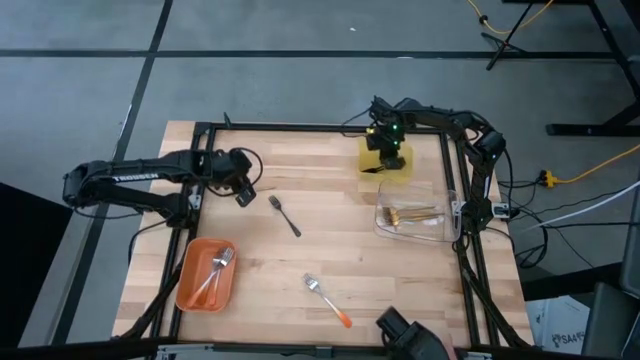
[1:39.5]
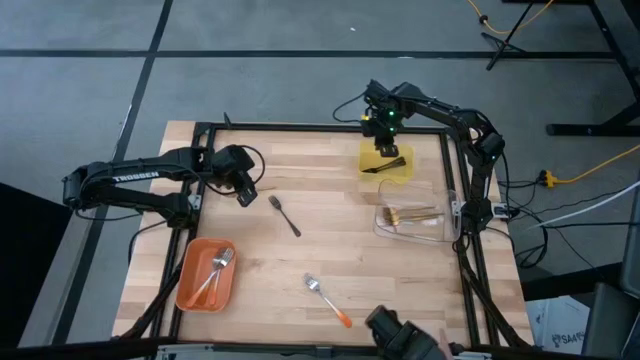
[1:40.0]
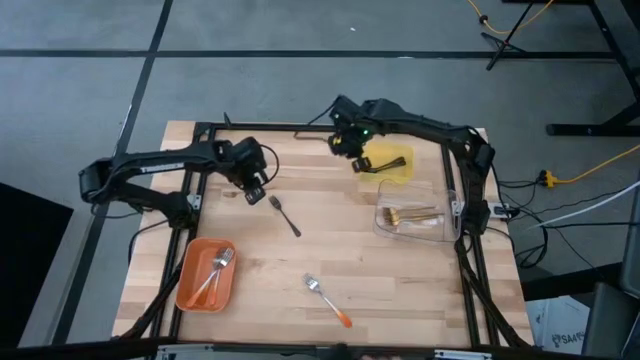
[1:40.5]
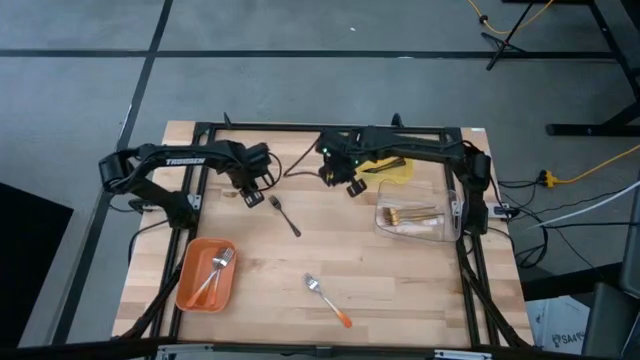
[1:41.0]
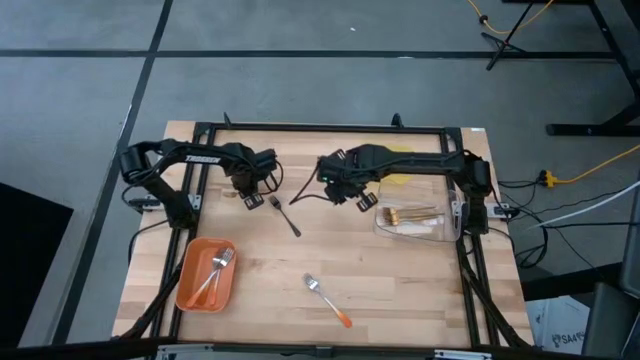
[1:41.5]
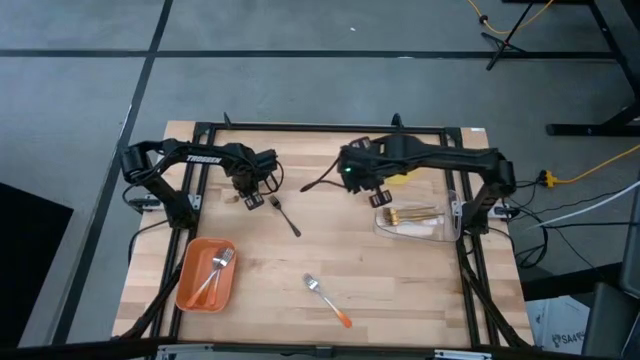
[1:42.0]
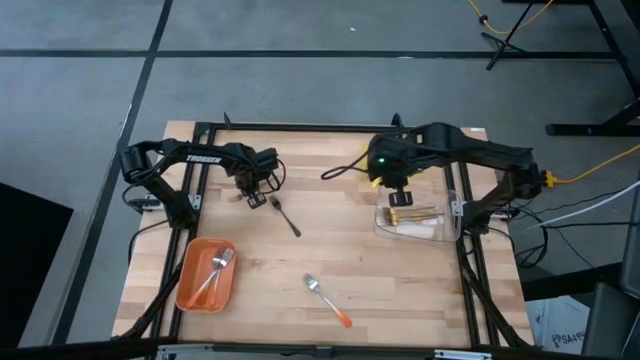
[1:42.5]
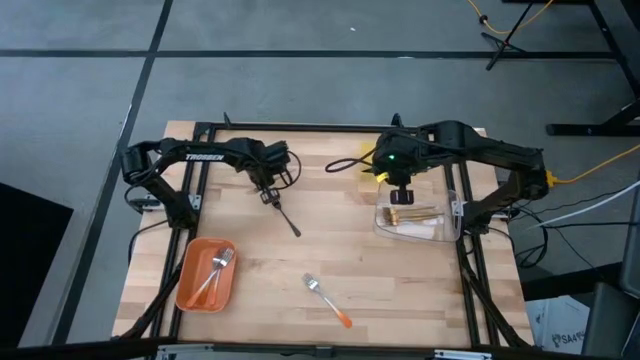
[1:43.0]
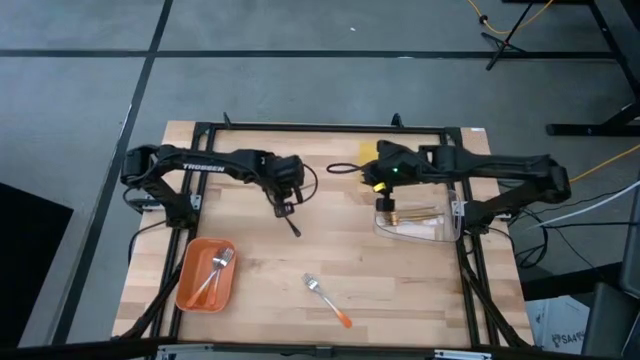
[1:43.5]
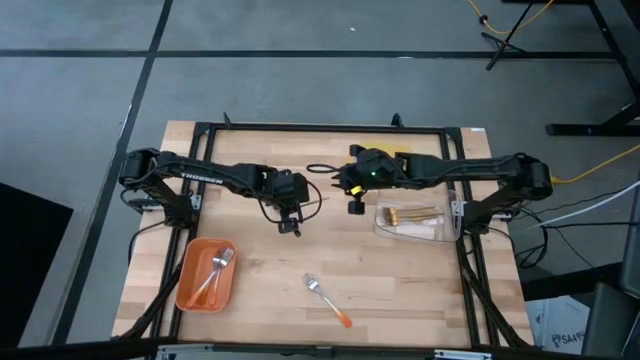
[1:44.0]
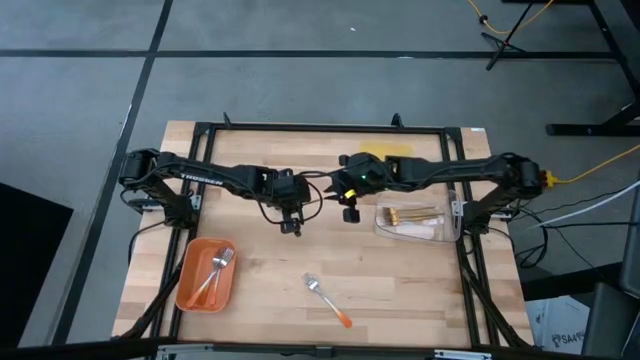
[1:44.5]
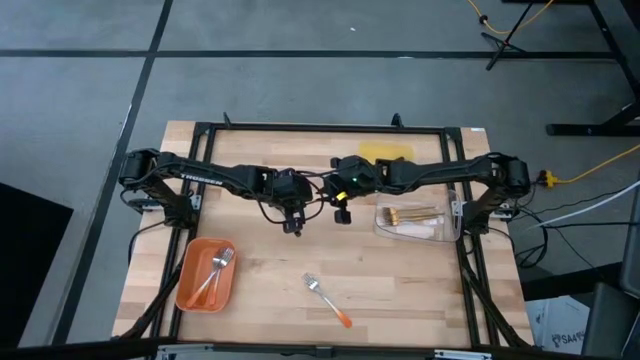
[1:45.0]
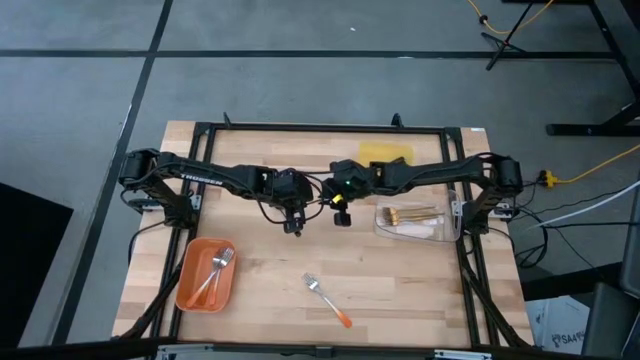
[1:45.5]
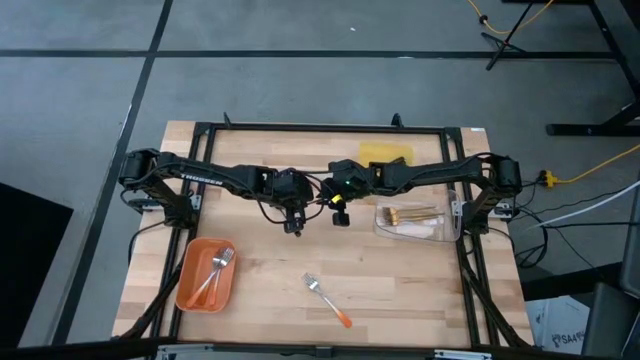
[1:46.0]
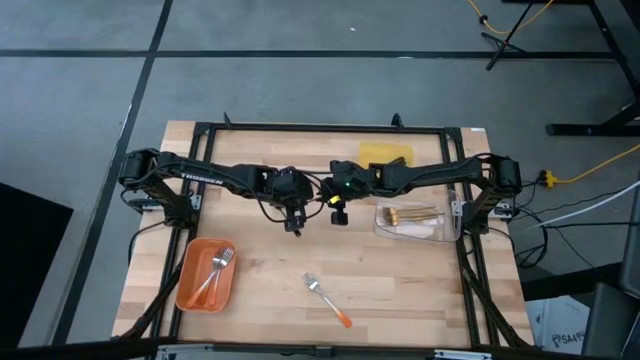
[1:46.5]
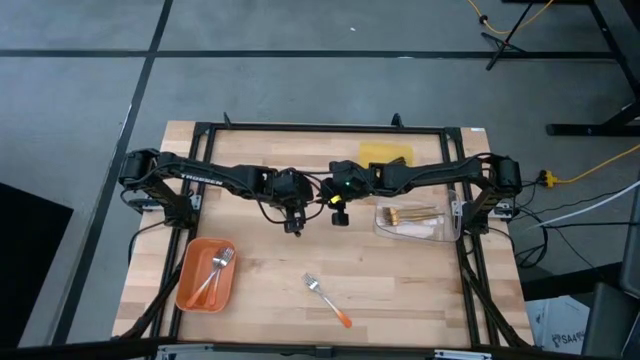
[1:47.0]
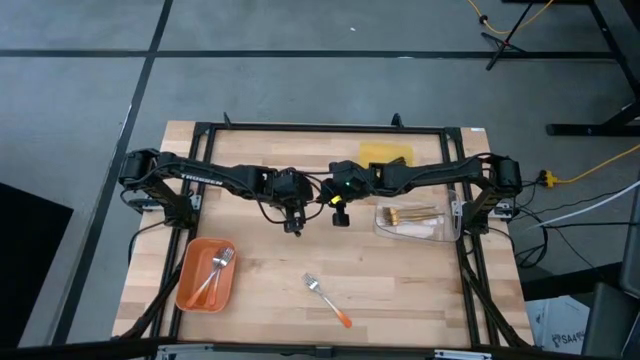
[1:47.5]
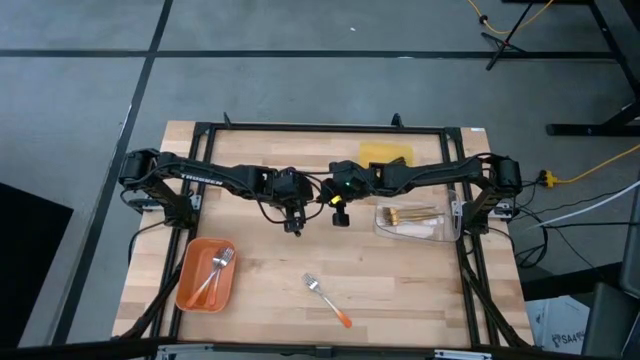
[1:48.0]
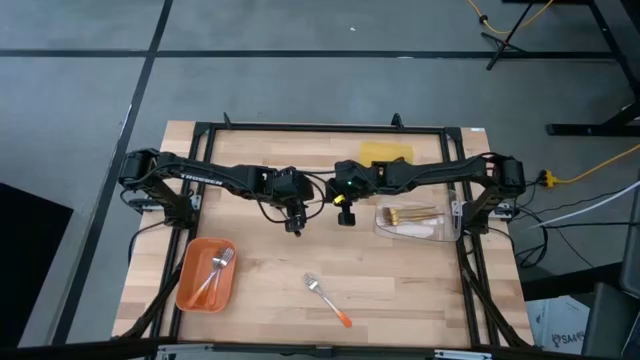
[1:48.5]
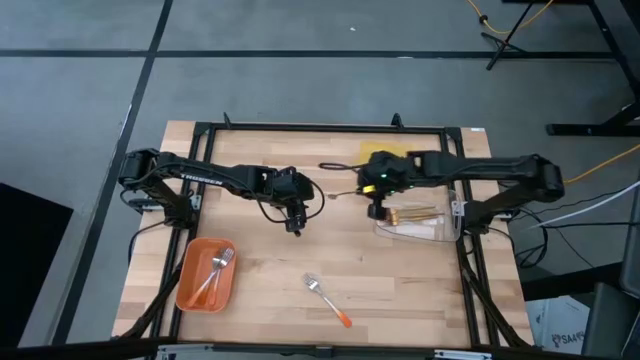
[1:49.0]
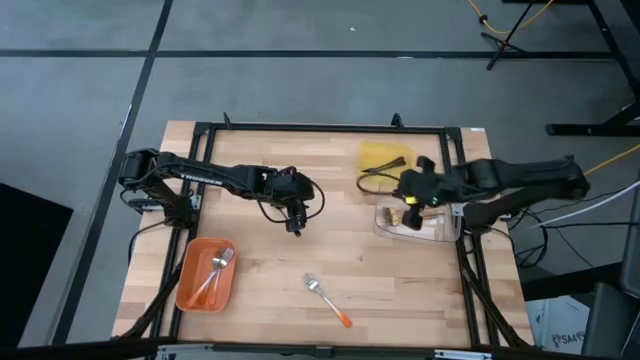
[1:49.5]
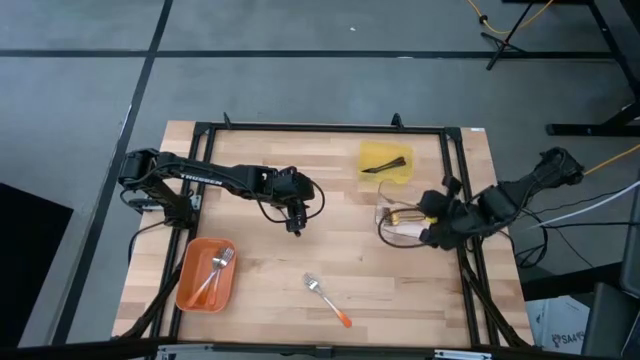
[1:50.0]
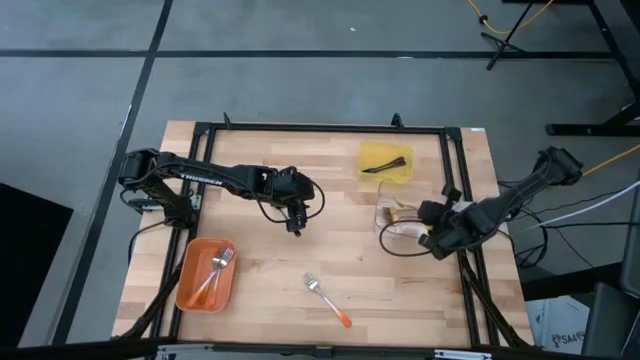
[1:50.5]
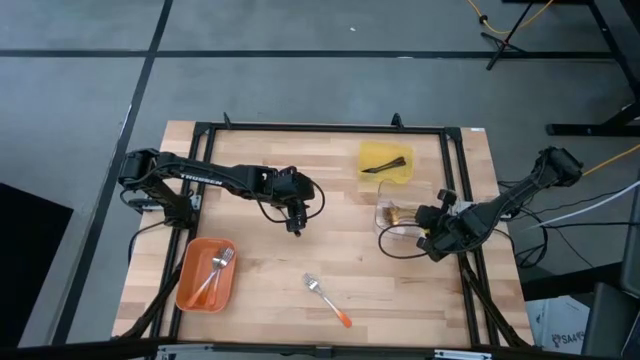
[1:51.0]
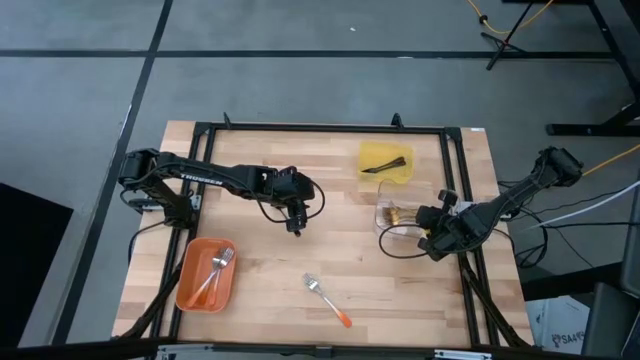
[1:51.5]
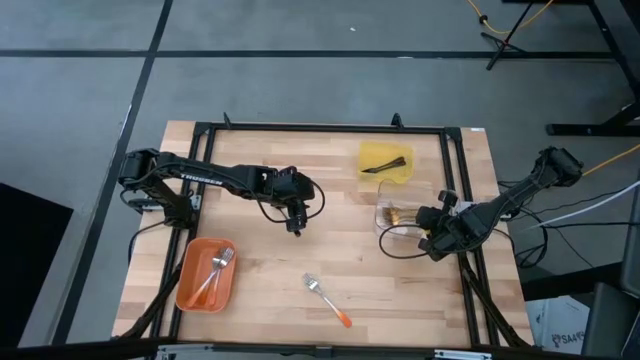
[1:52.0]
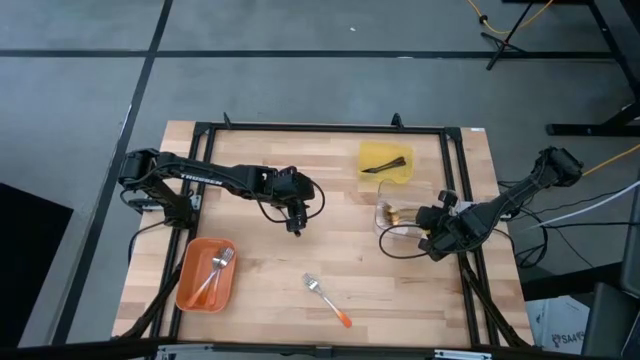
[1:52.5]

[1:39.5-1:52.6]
Task: Sort silverware by color (type)
Put the gold fork into the transparent bin

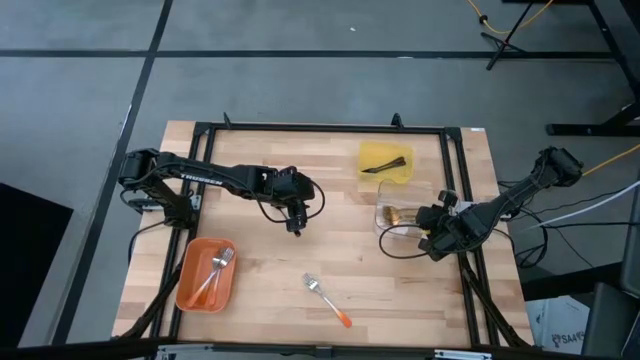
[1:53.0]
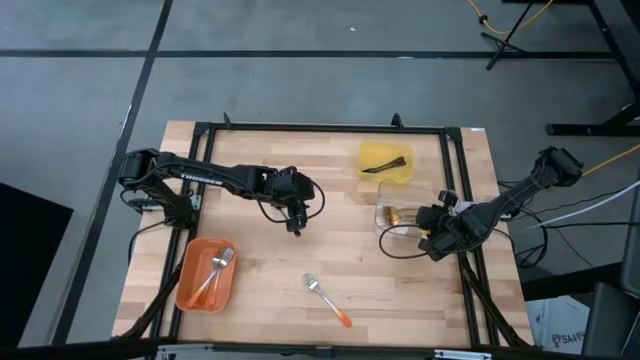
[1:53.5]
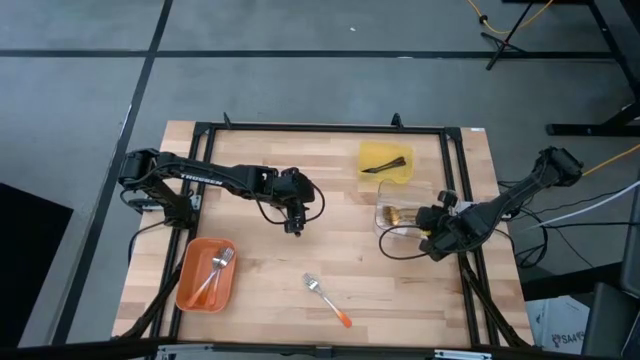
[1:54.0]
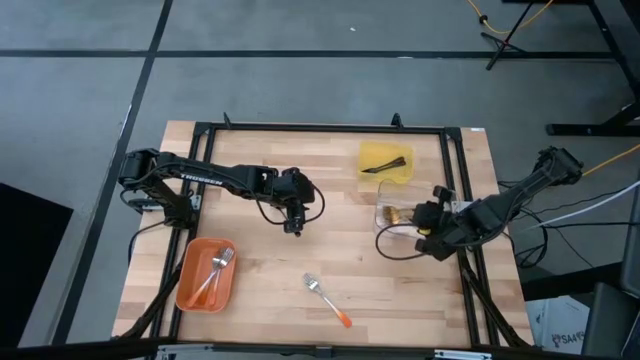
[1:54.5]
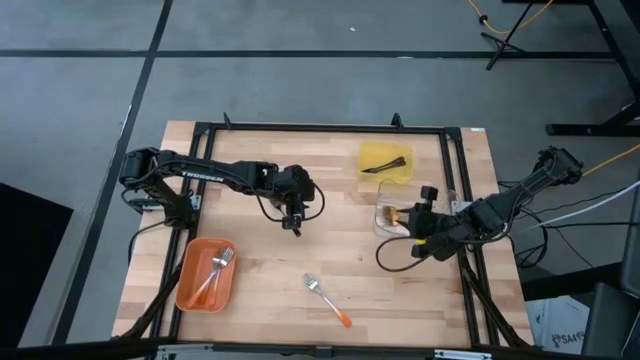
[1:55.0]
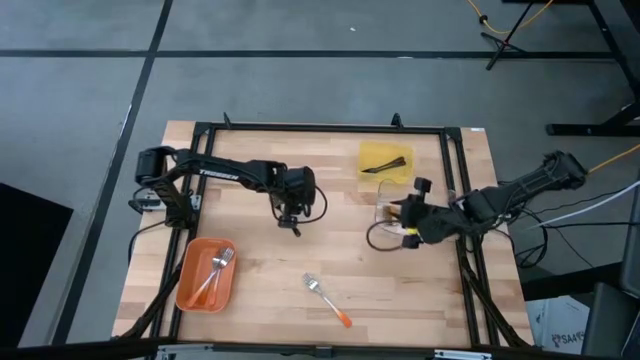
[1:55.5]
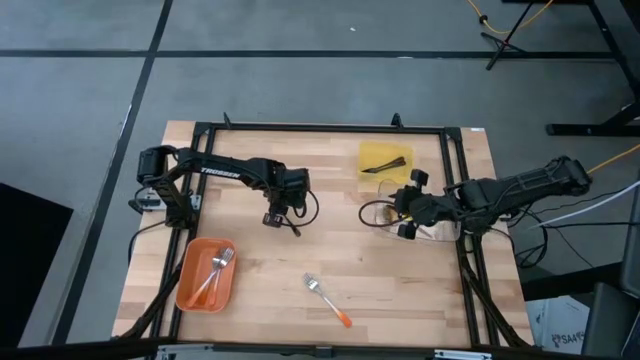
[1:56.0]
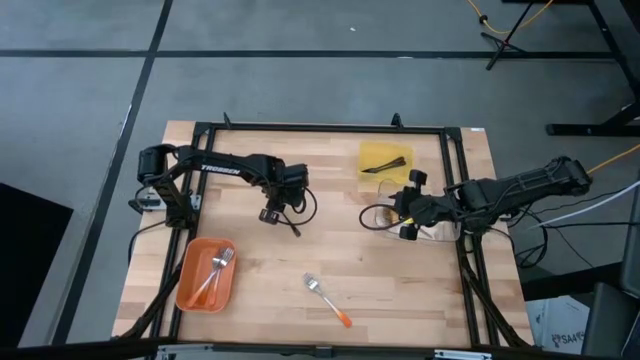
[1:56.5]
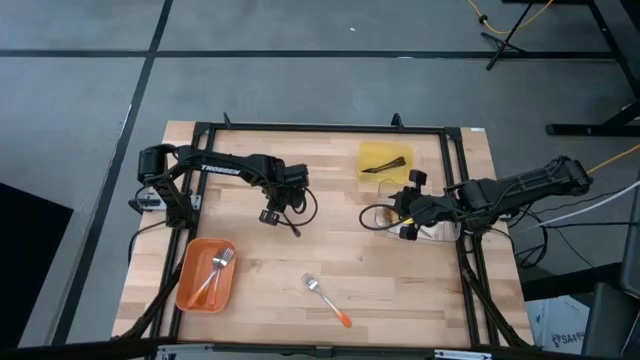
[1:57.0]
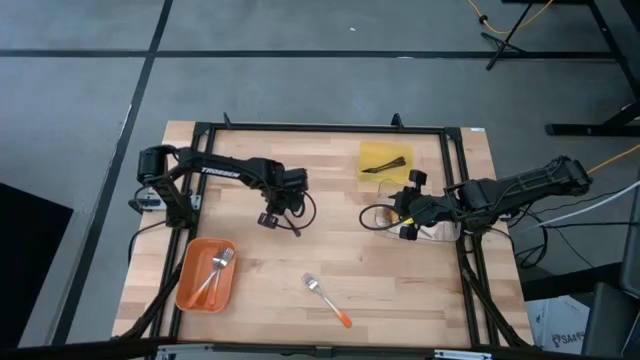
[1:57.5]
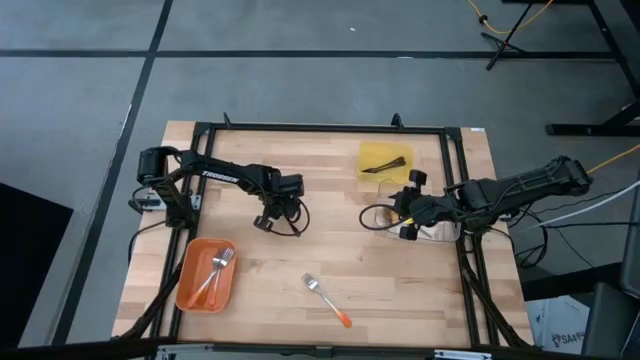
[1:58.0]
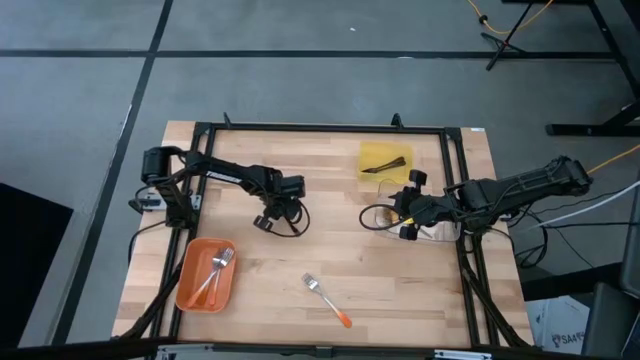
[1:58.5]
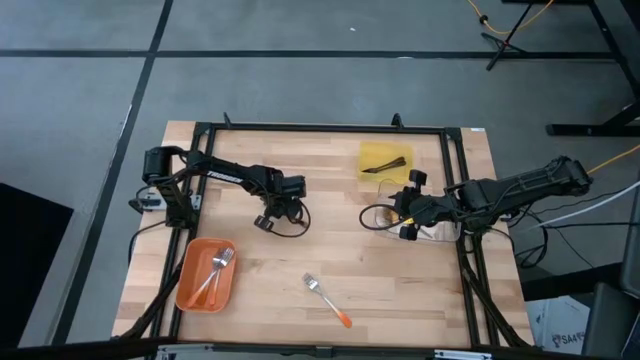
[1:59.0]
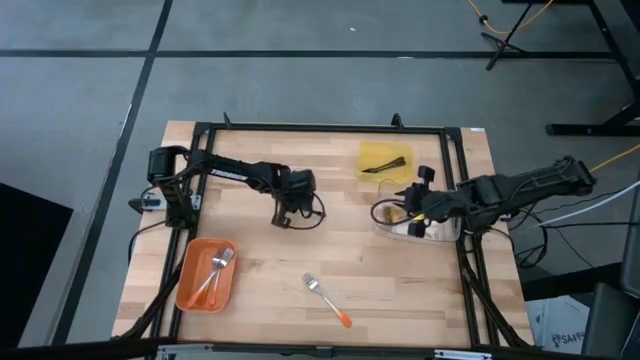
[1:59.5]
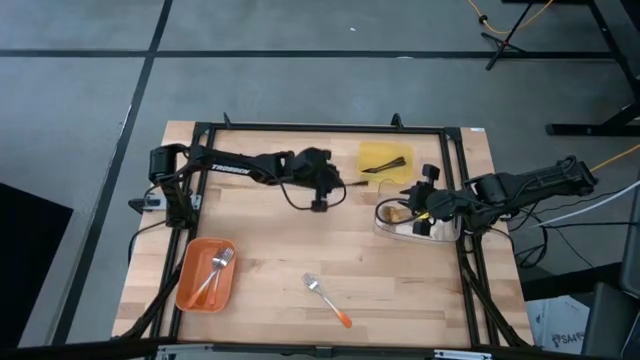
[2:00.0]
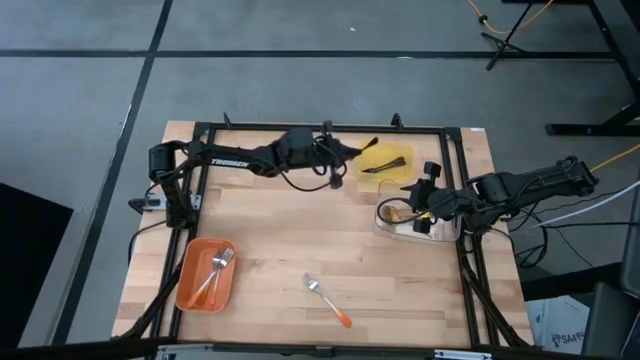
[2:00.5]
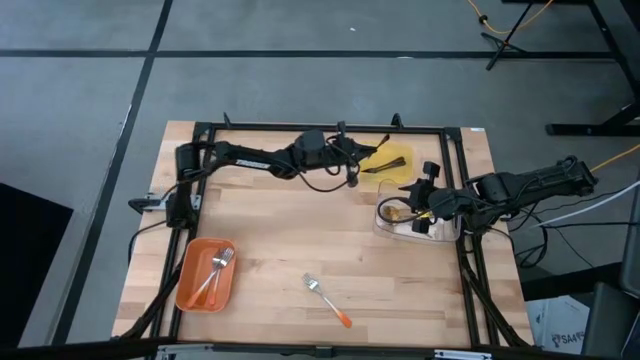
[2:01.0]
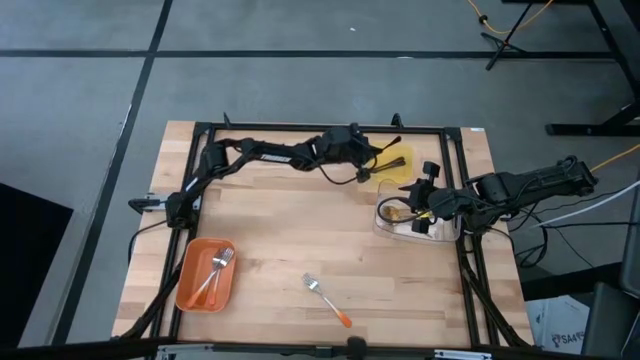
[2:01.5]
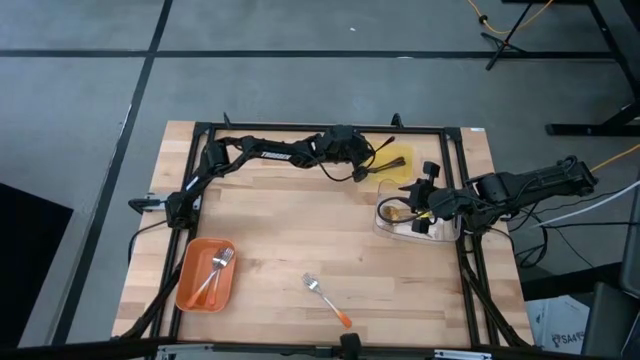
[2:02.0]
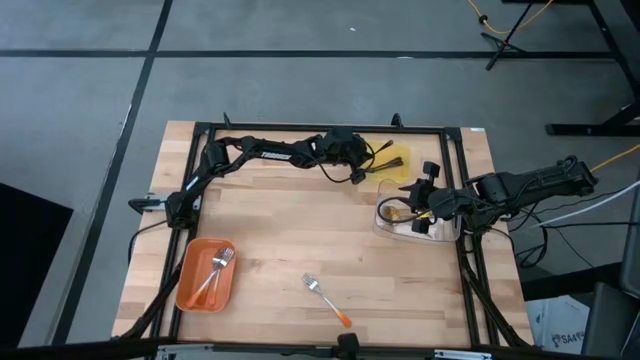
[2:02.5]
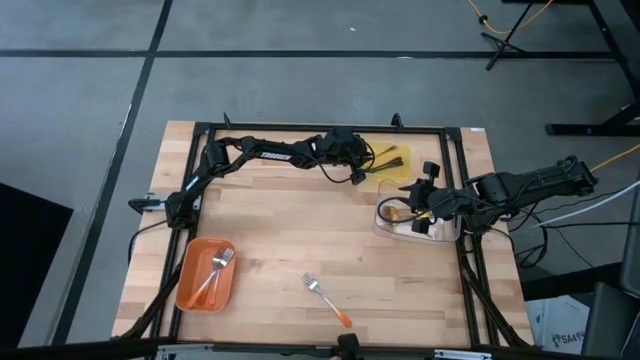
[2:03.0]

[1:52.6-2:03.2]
Put the black fork into the yellow bin
